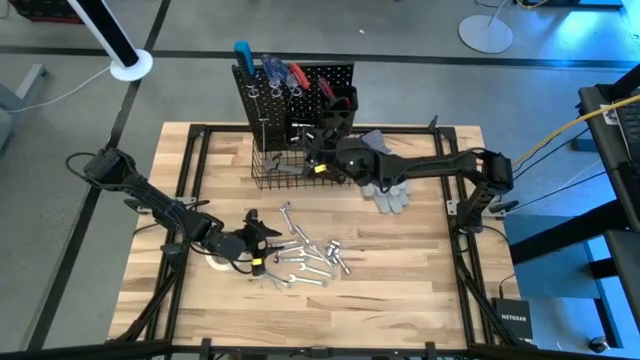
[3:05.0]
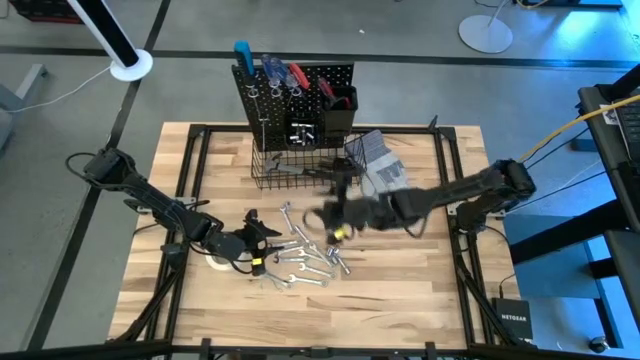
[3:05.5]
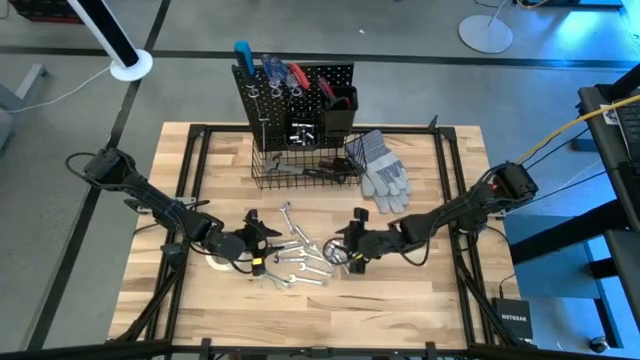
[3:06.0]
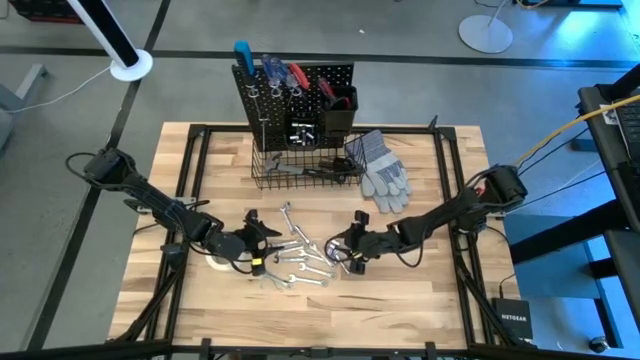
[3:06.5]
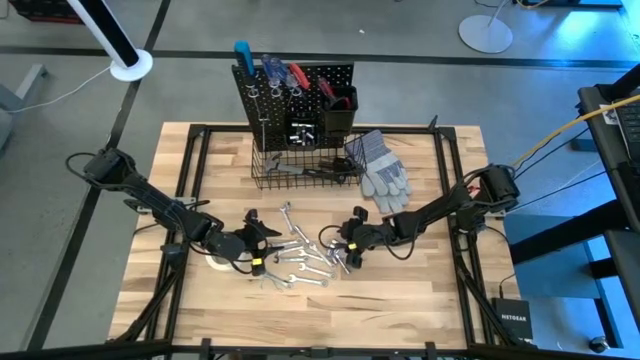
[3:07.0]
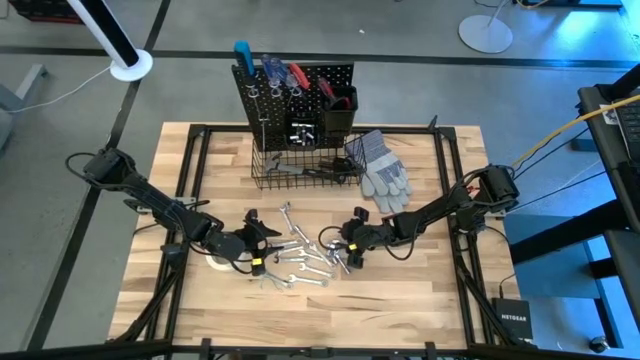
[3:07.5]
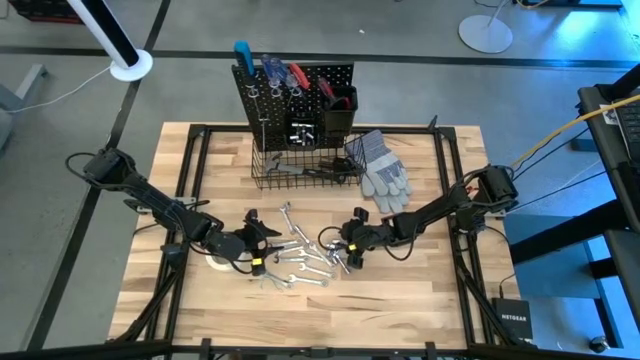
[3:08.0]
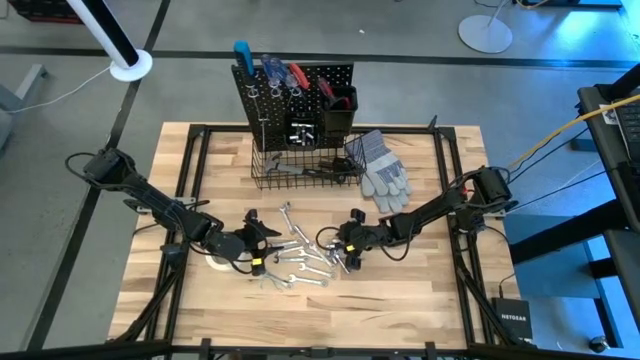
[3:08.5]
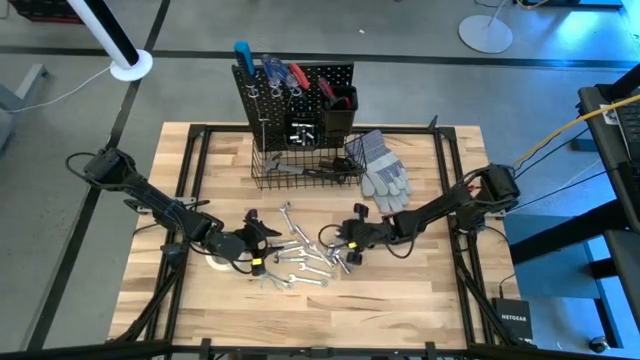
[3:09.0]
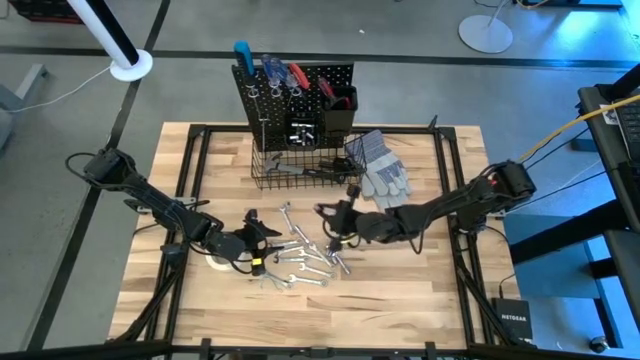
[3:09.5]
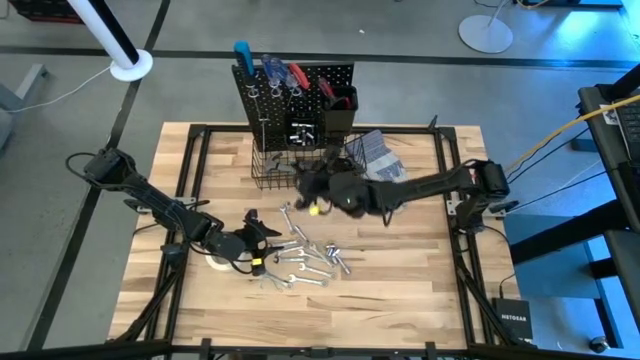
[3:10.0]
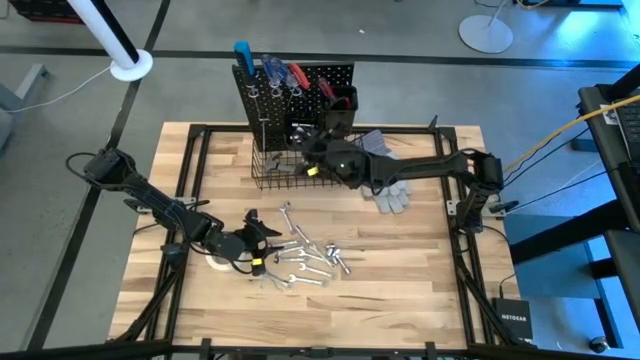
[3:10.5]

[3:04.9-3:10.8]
Task: Hang tools onto peg board
Put the socket into the left black bin on the peg board

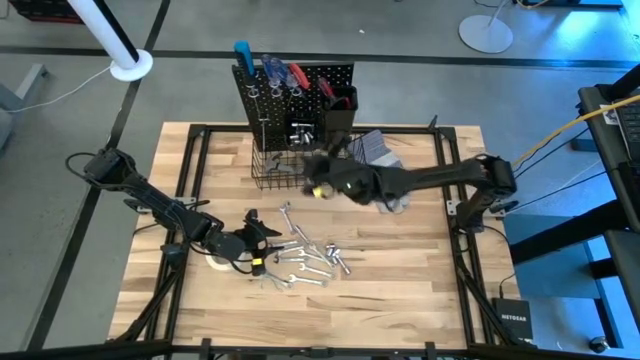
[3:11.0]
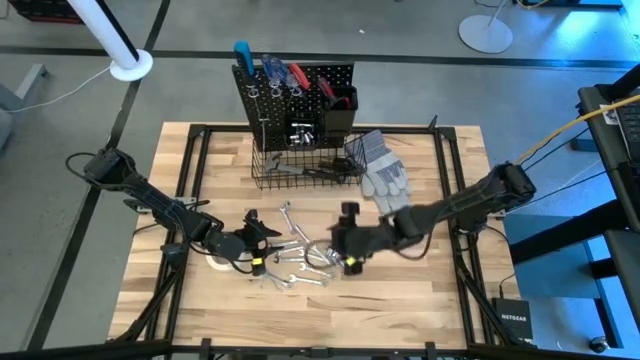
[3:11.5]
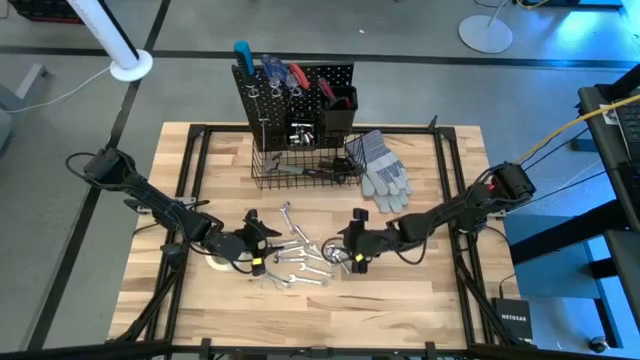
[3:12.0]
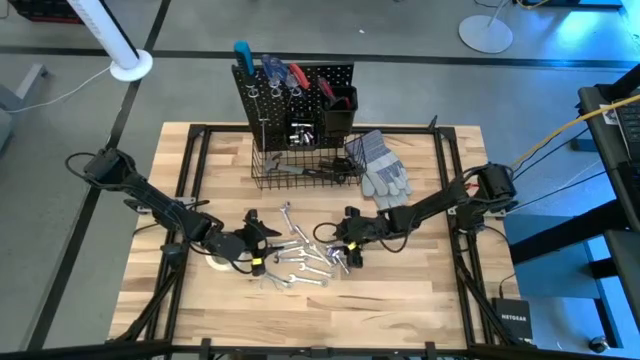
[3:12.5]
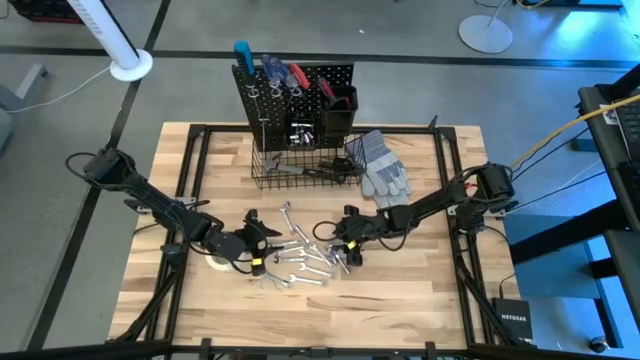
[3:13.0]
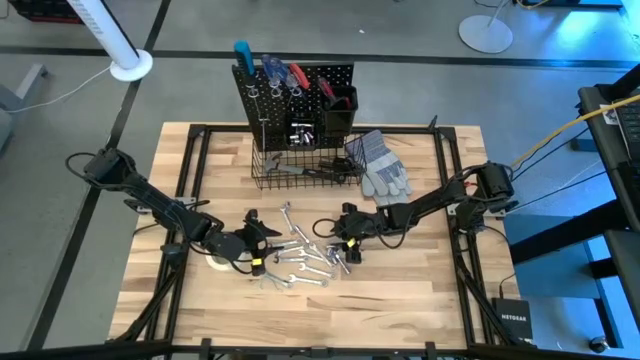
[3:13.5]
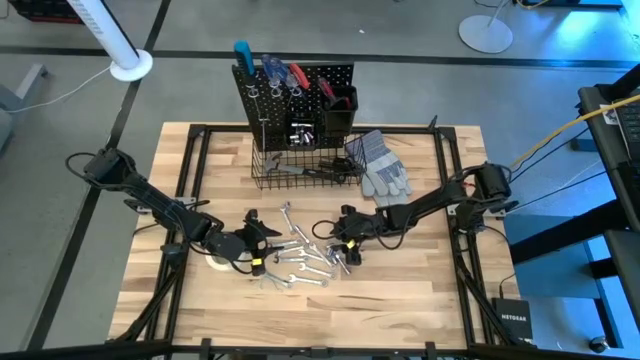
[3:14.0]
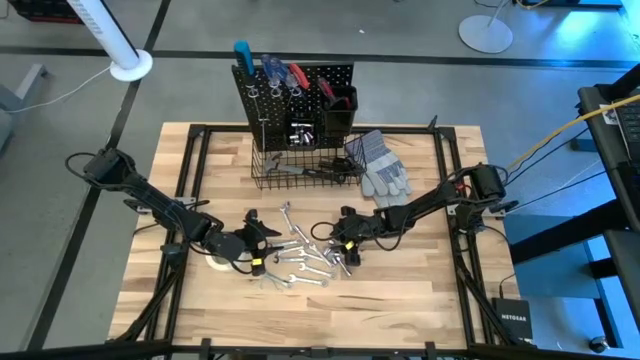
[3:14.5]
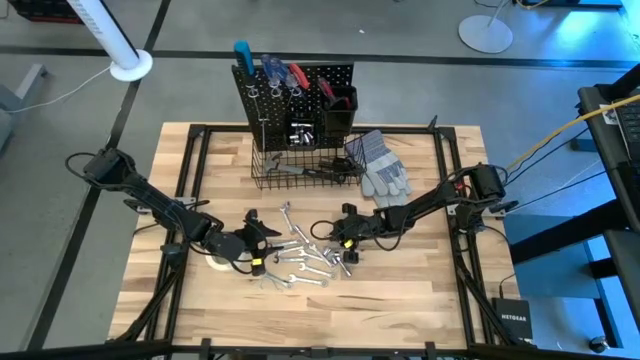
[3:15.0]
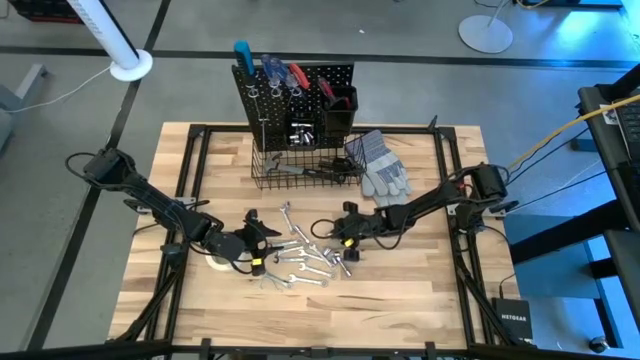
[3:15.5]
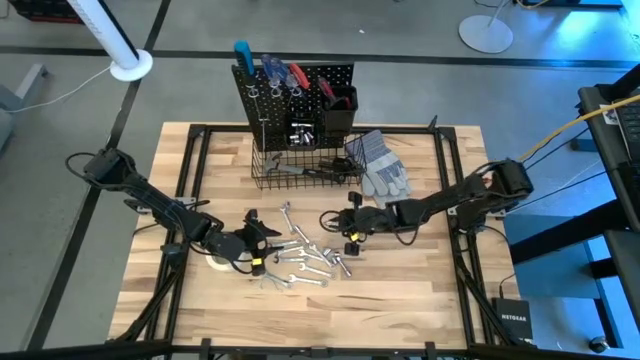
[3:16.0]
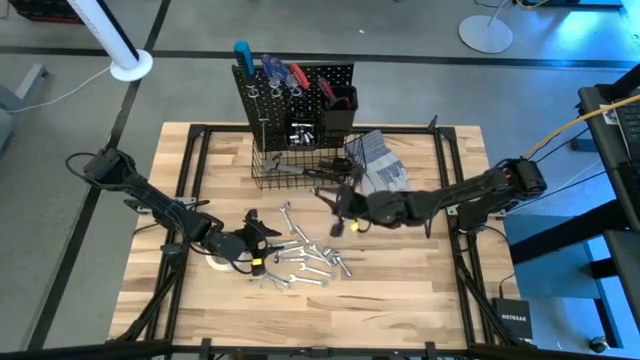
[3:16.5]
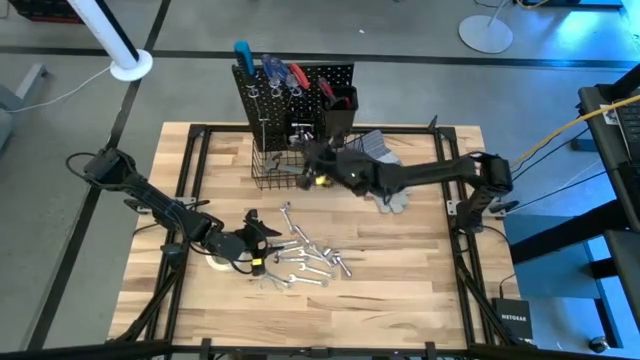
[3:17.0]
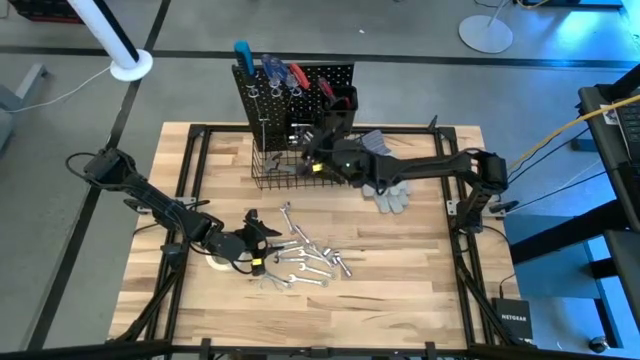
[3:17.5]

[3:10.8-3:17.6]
Put the socket adapter into the left black bin on the peg board

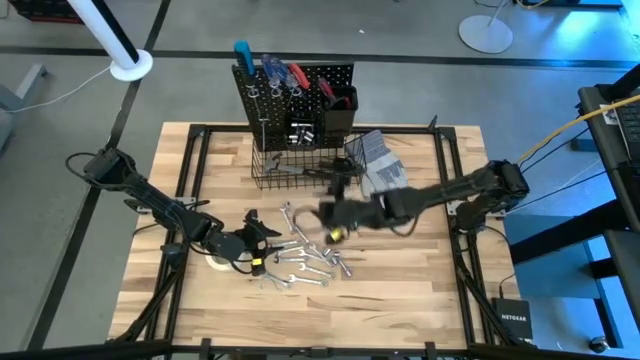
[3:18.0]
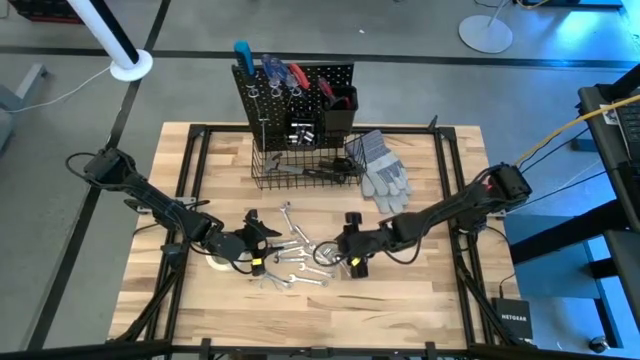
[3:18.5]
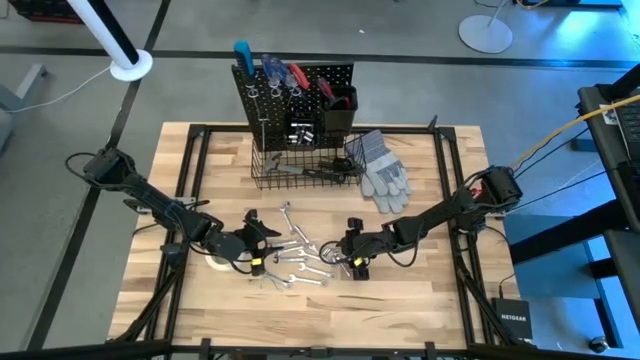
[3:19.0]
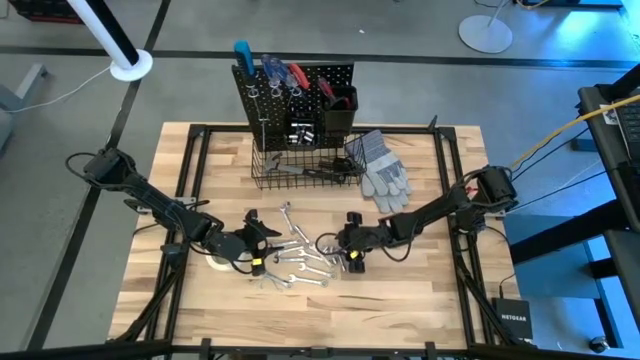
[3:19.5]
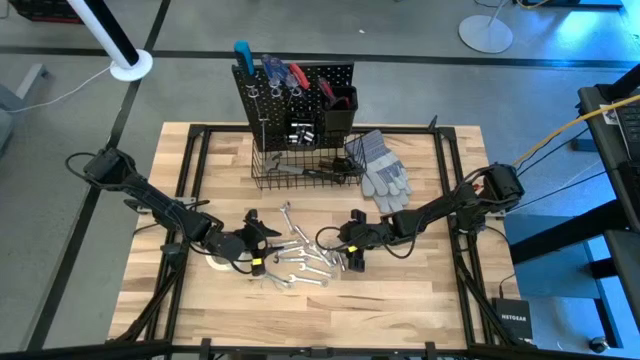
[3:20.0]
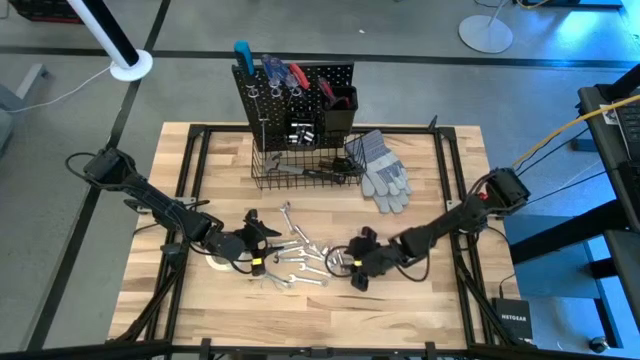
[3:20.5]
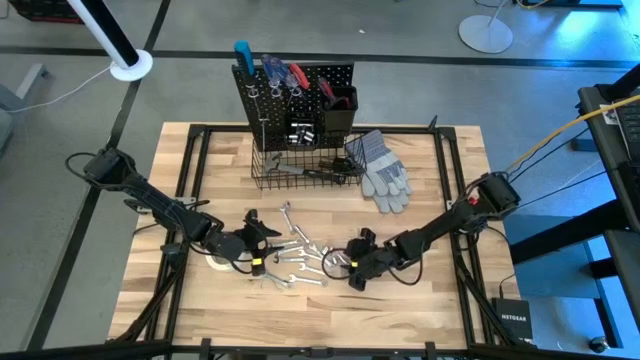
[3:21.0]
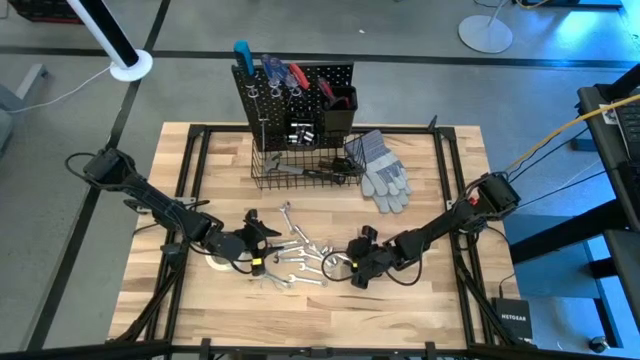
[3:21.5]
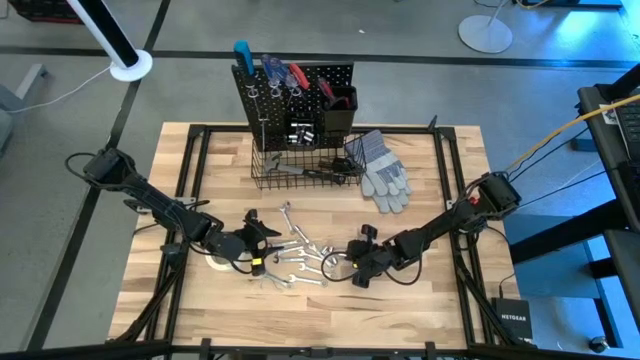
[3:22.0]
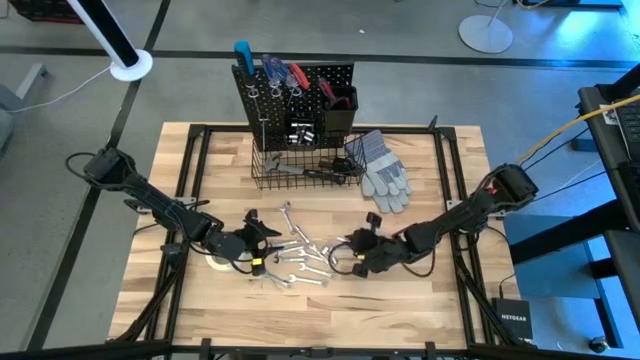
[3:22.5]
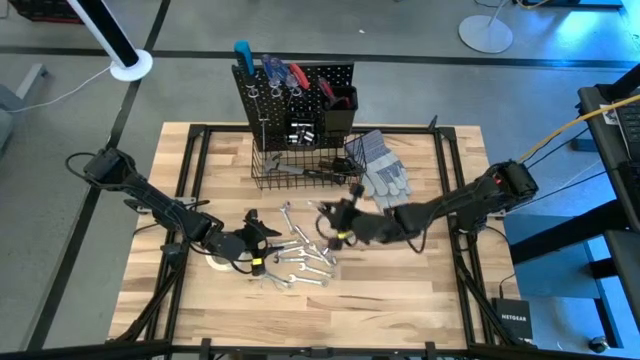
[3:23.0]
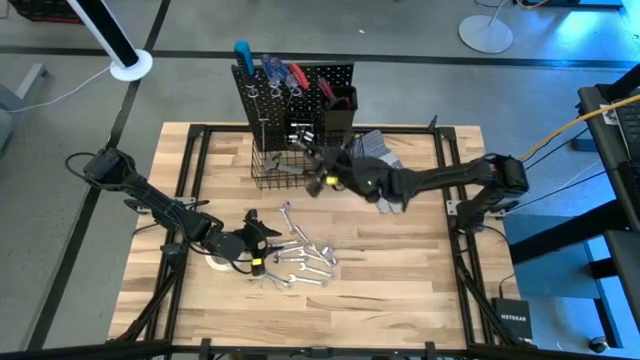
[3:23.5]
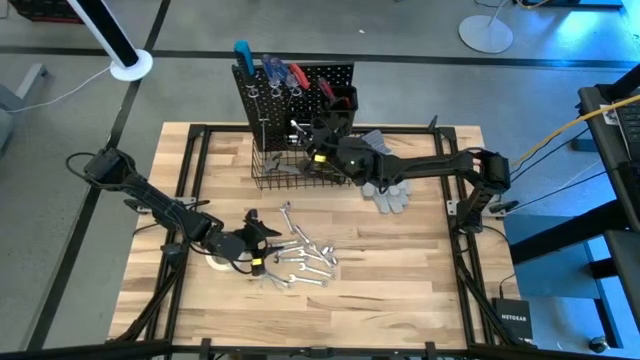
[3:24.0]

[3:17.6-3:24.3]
Put the extension bar into the left black bin on the peg board

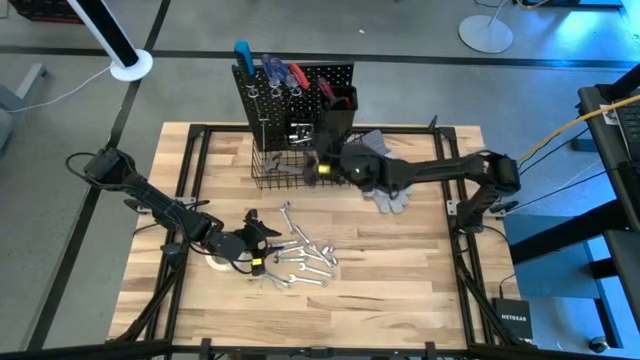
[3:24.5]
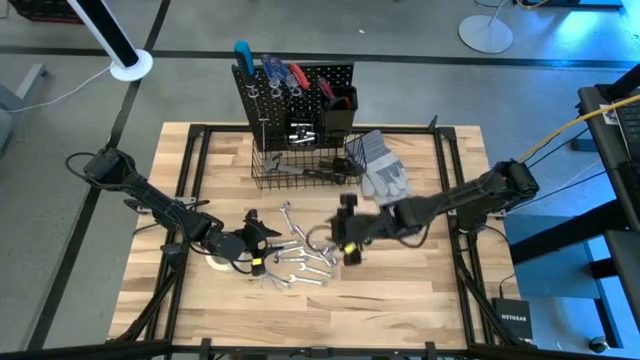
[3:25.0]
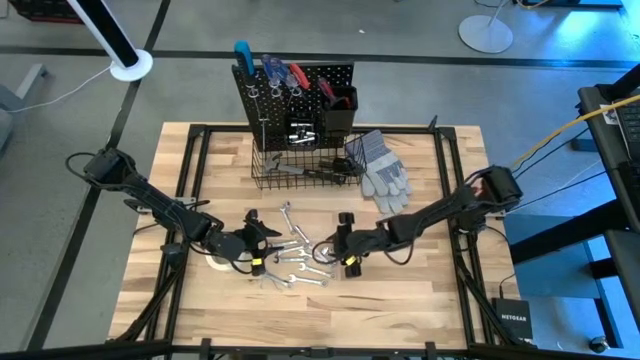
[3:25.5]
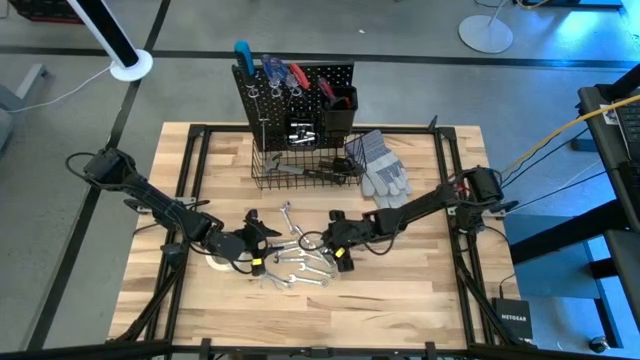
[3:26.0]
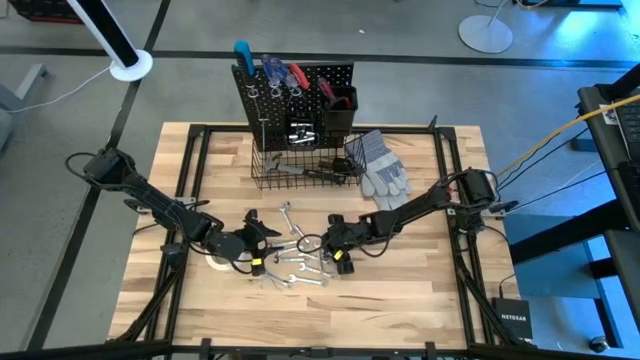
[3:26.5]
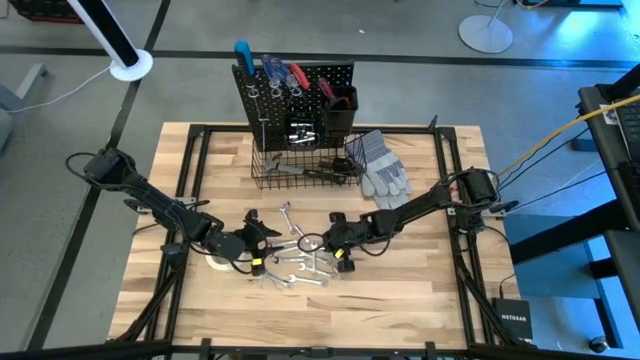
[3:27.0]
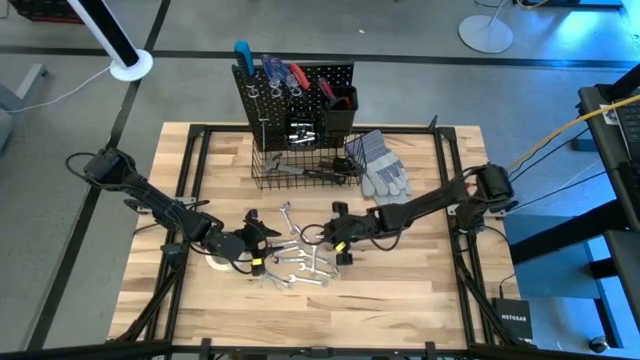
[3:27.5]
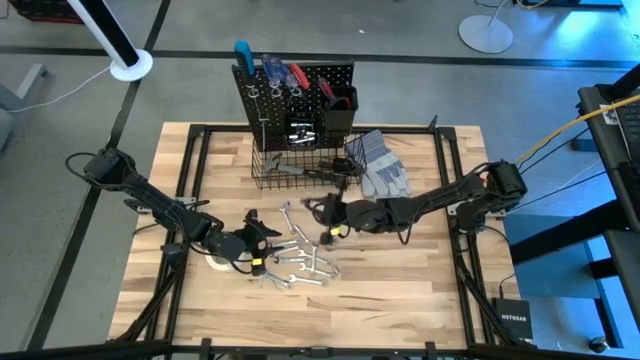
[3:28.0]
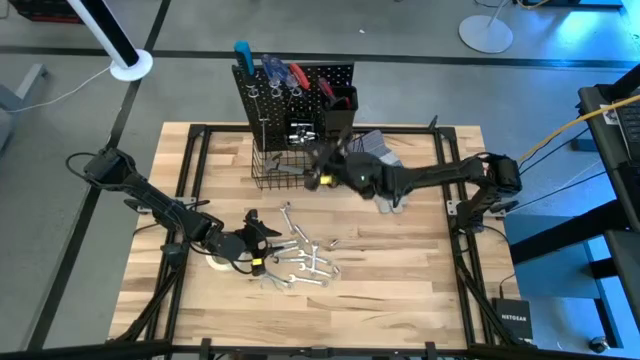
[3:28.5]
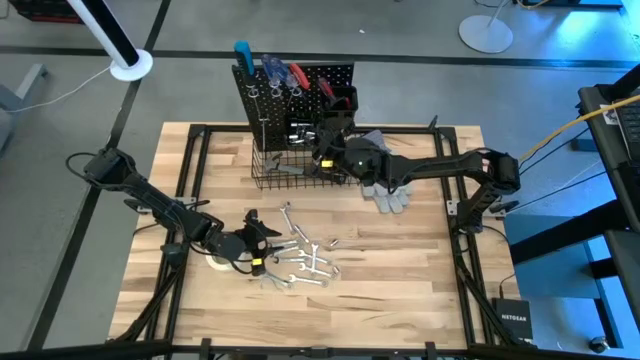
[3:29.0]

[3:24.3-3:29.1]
Put the socket into the left black bin on the peg board
